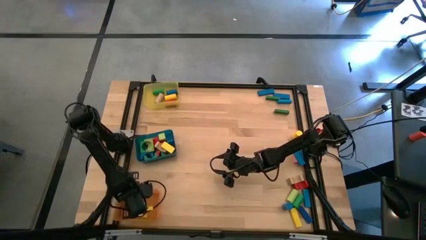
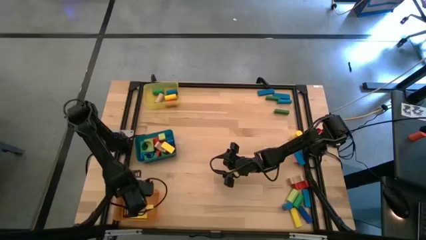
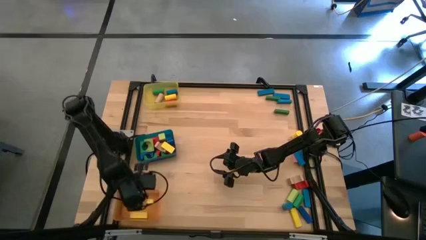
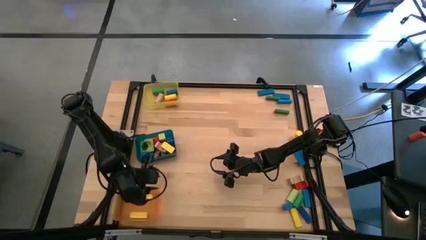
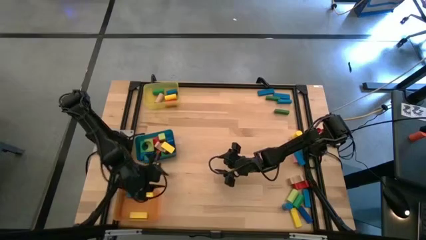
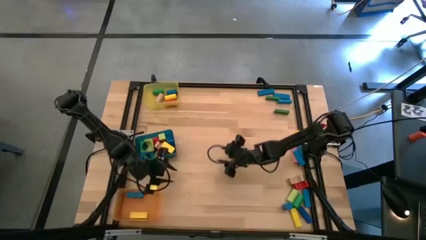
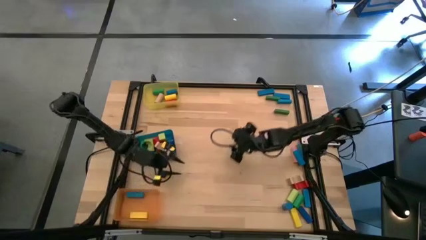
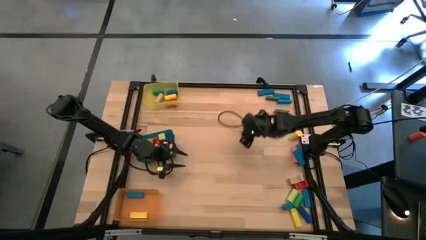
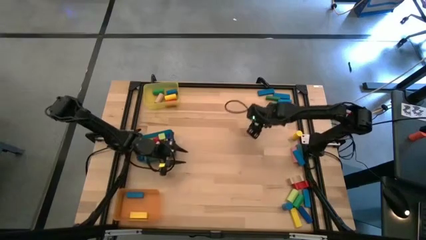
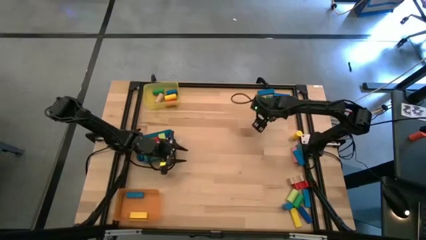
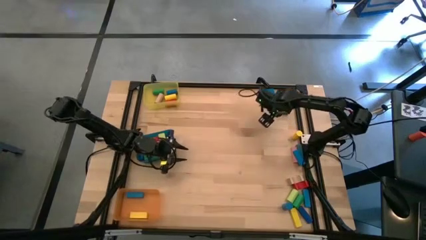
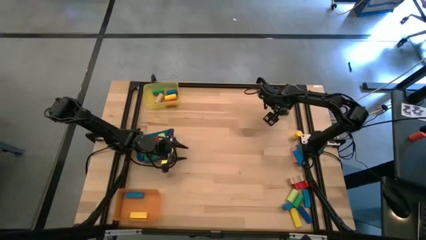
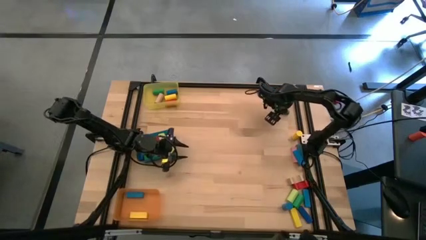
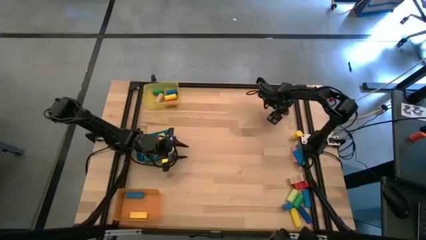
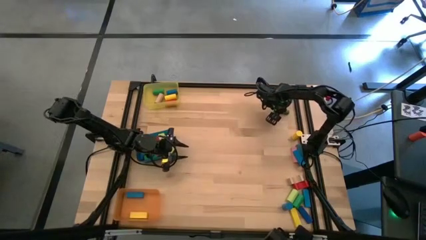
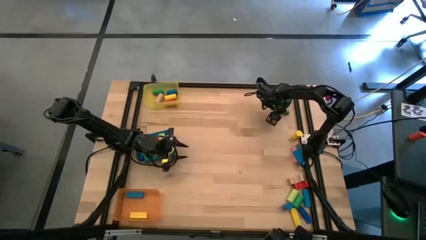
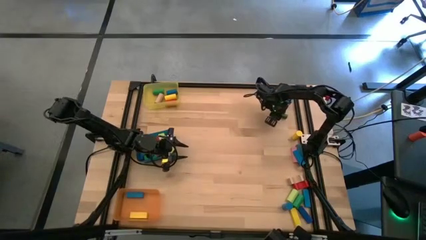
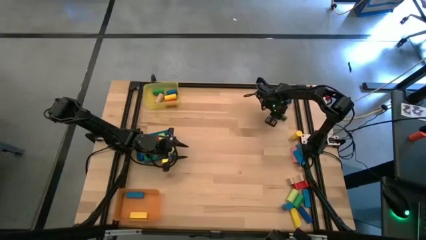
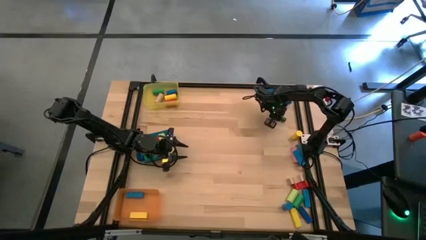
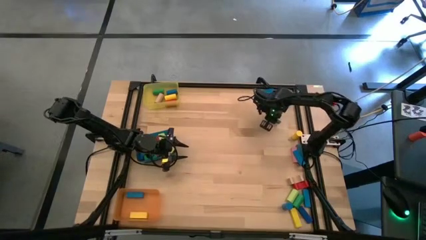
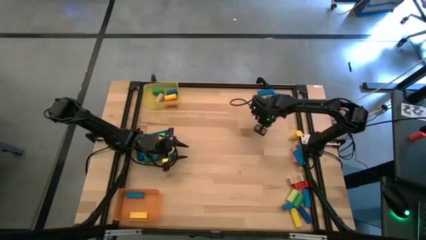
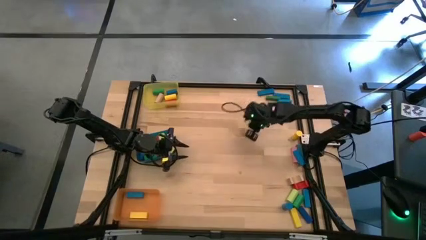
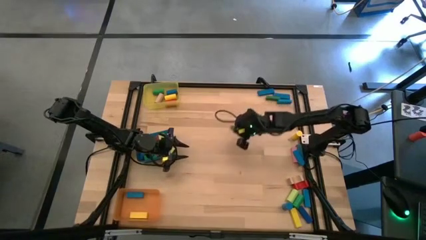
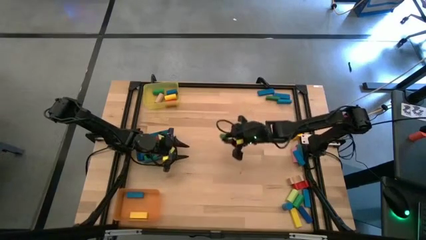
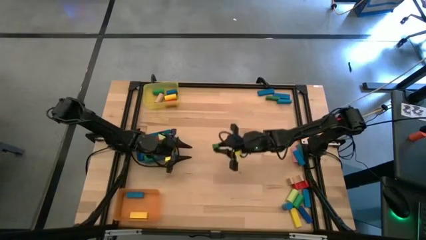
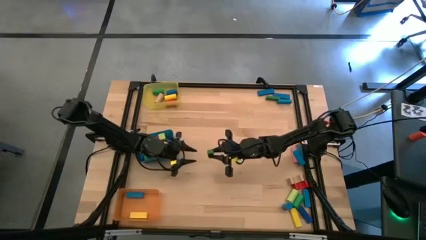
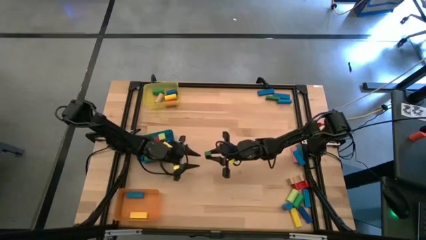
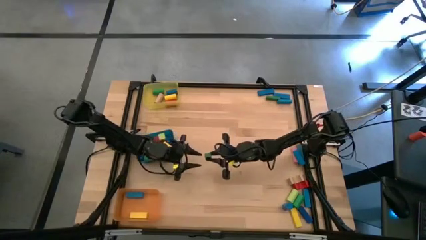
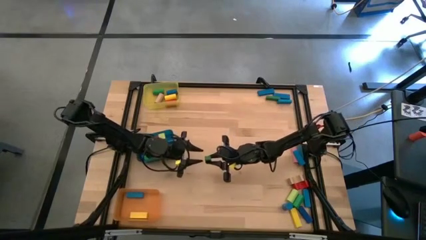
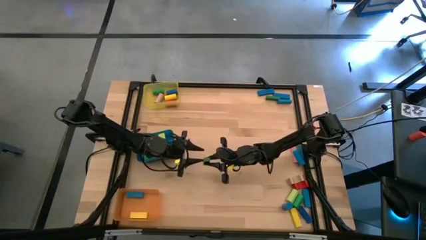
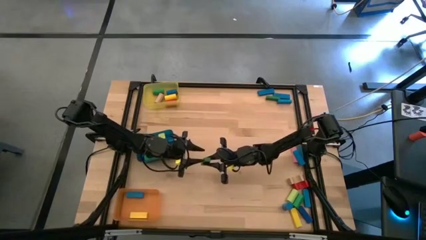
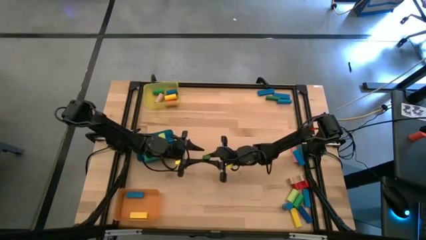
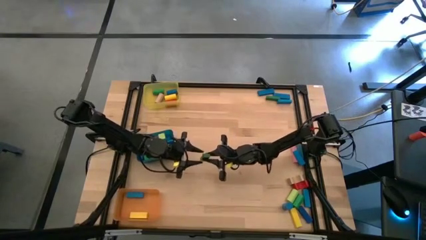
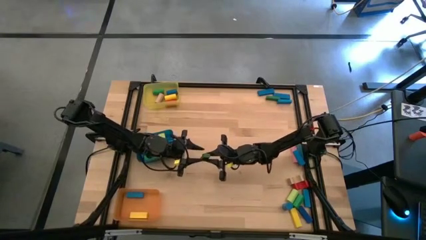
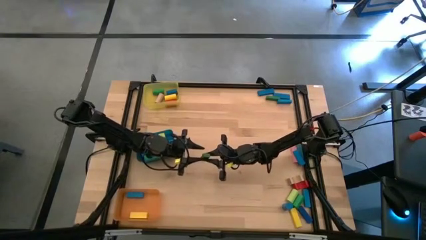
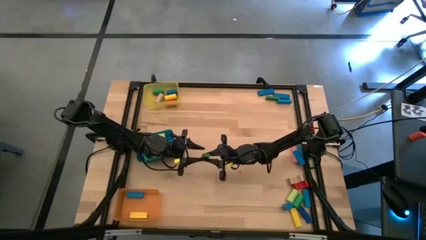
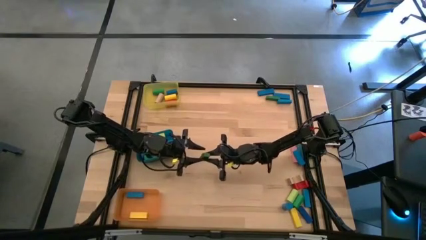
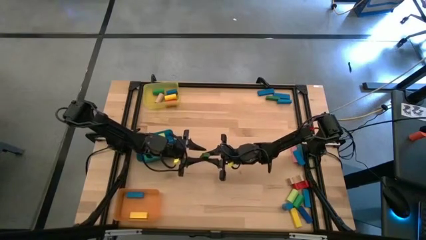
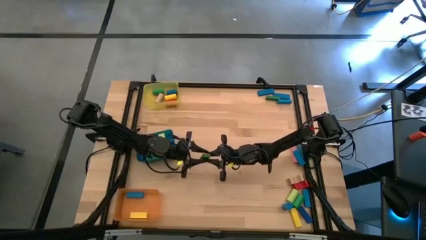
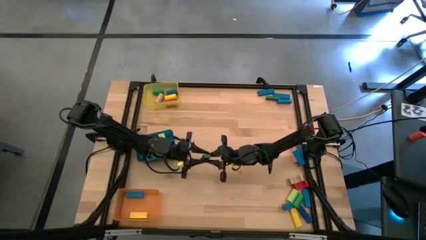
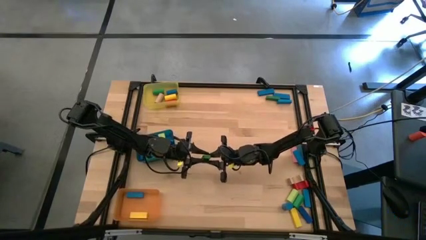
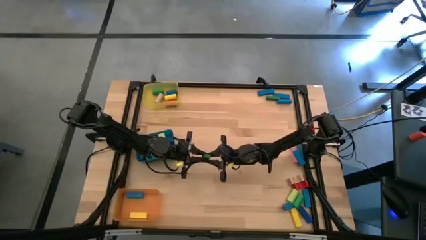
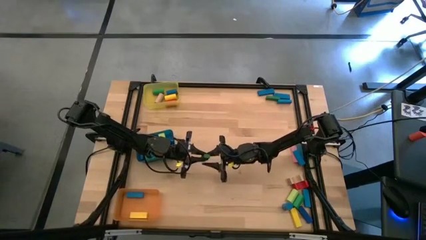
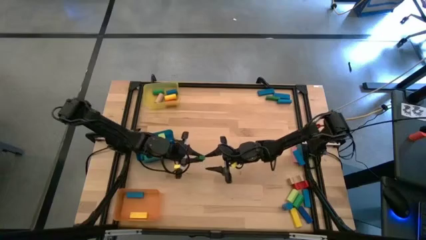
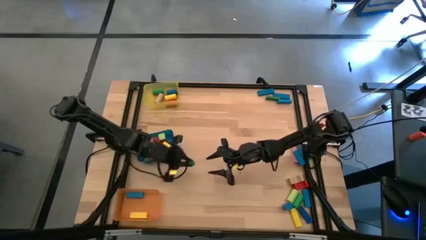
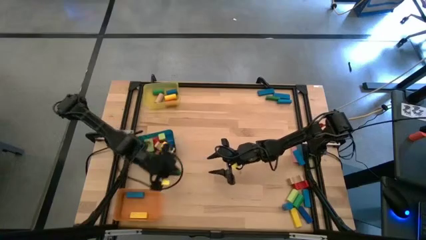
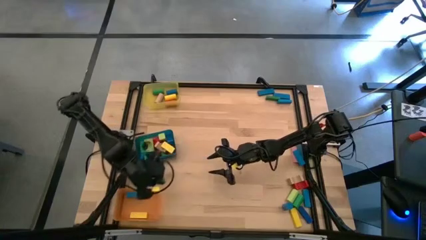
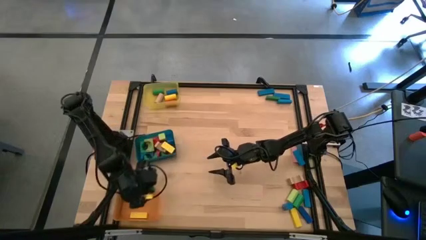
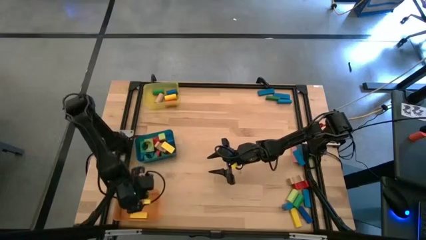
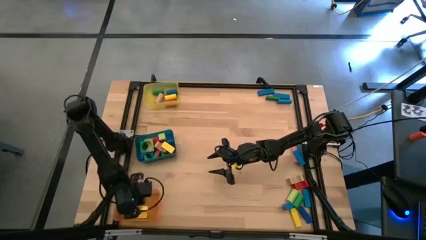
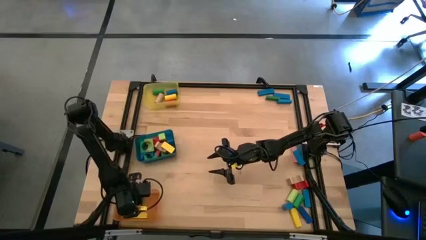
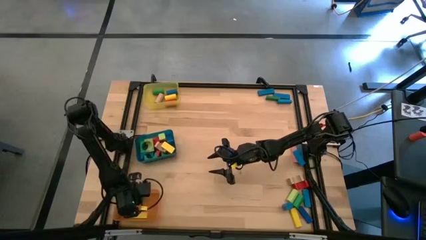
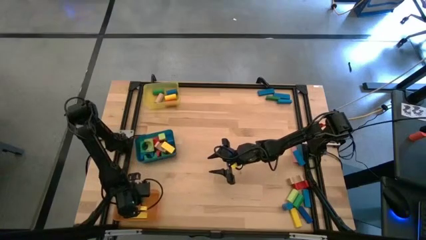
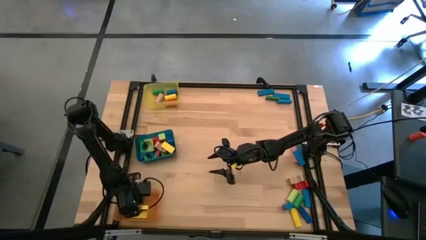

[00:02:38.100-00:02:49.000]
Task: Sort blocks by size
Put the green block into the orange bin

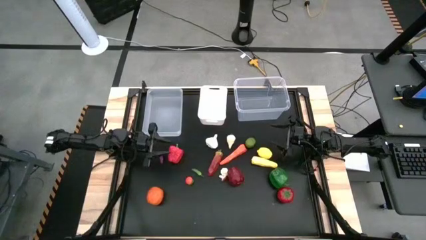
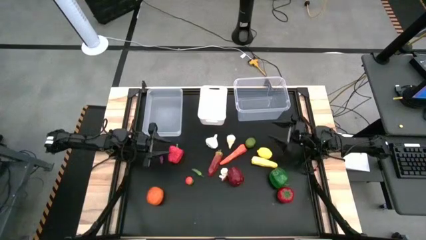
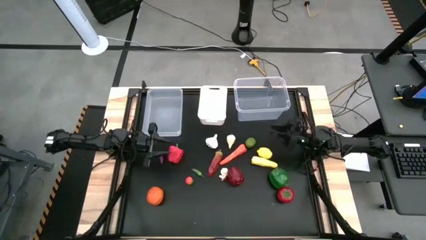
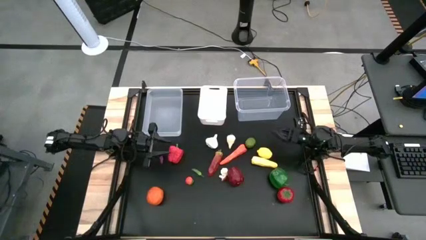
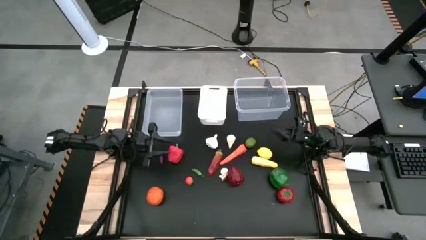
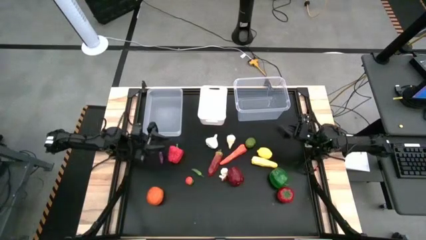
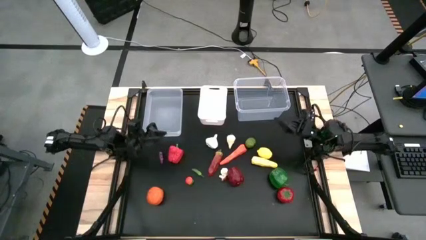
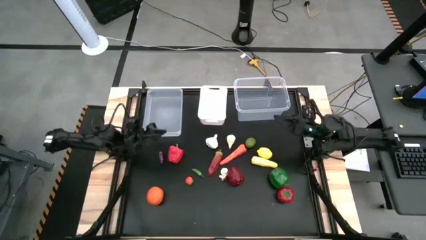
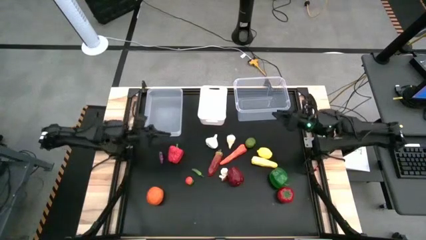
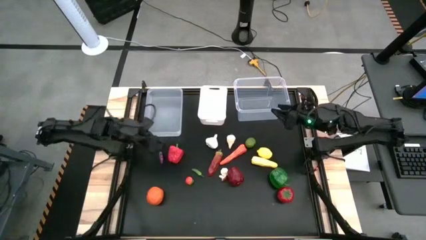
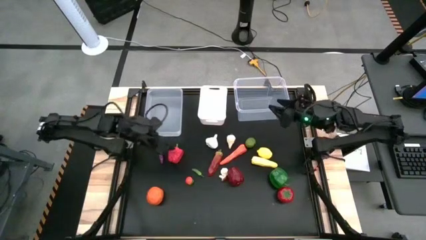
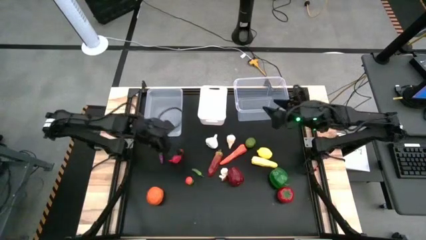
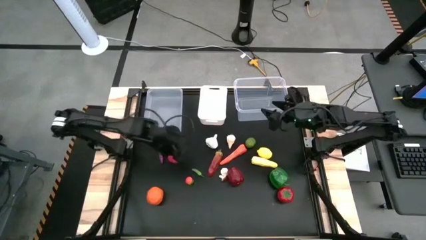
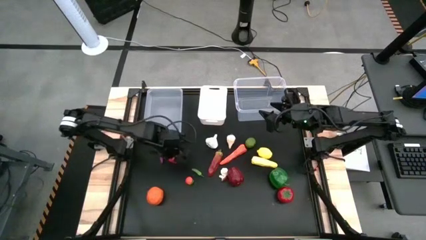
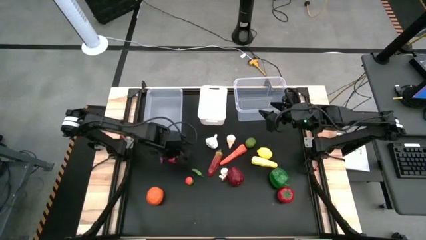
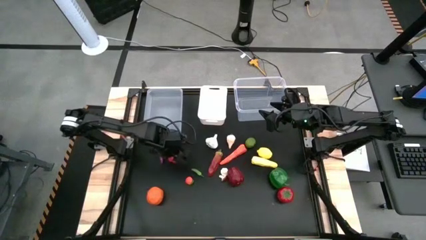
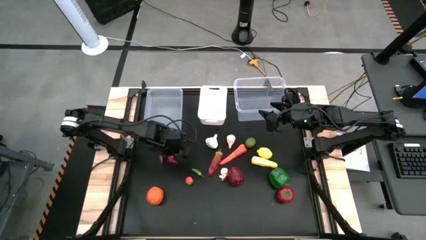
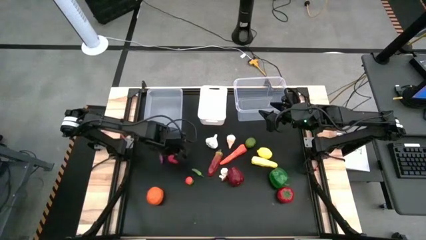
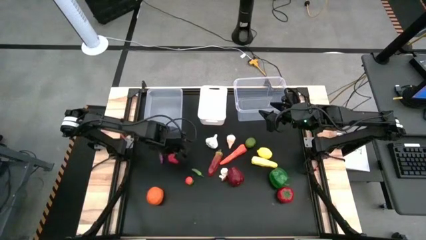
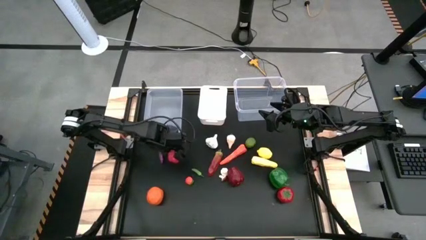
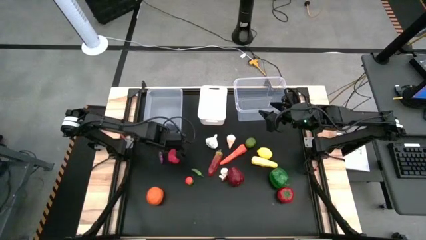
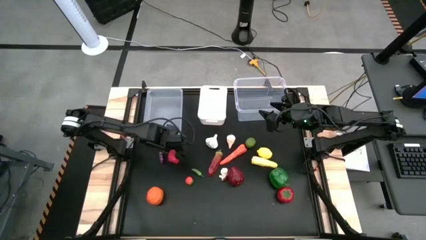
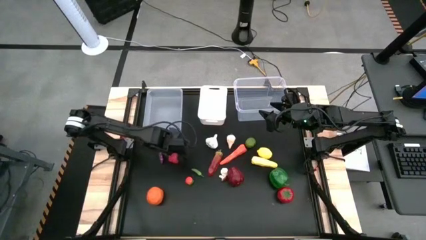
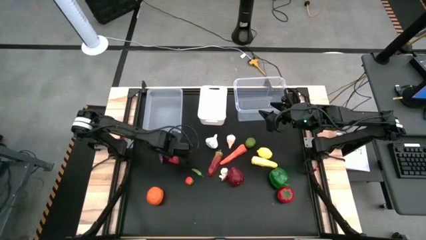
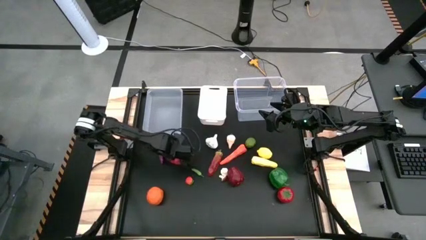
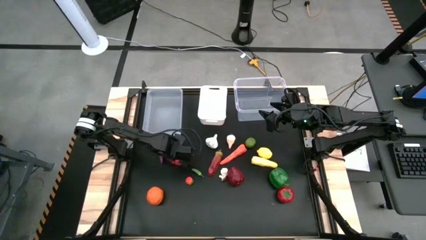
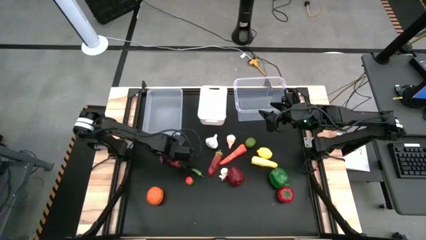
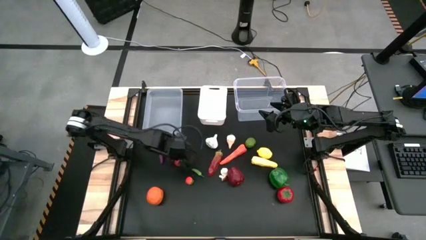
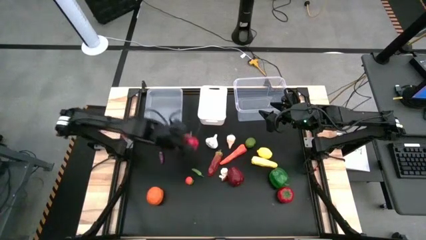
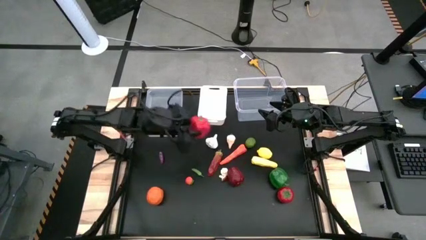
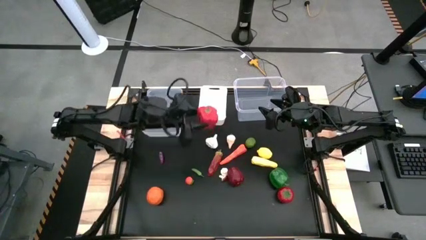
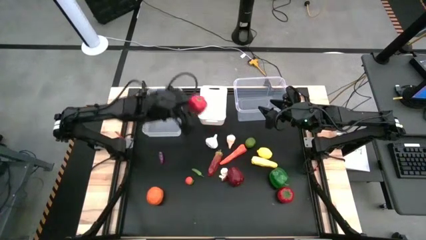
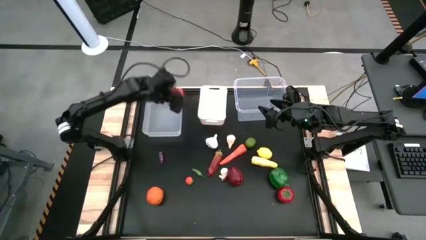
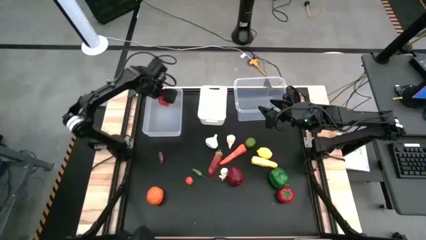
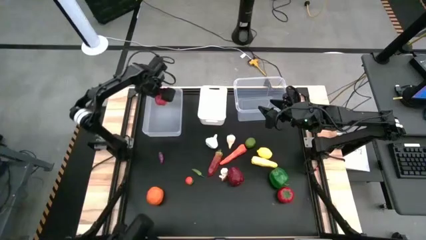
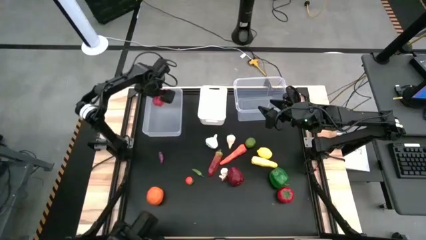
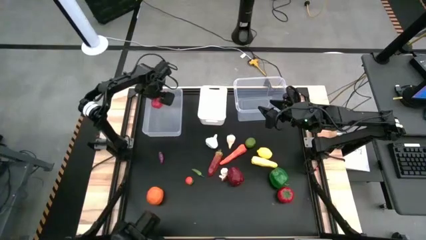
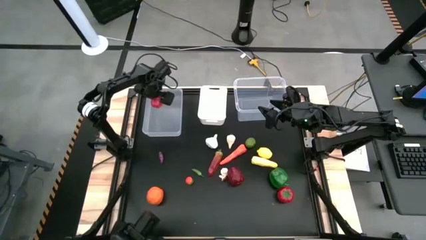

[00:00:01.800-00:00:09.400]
Task: Sort produce into baskets
Put the red bell pepper into the left transparent bin
